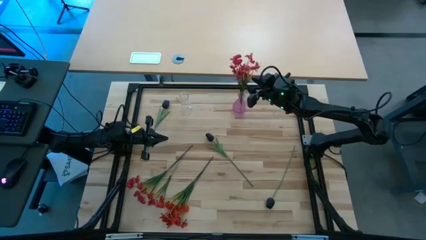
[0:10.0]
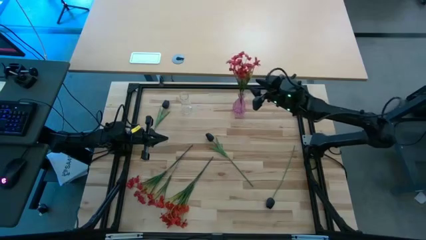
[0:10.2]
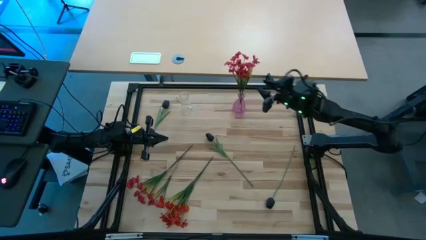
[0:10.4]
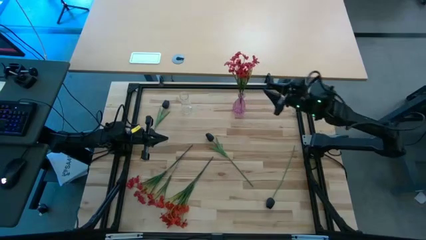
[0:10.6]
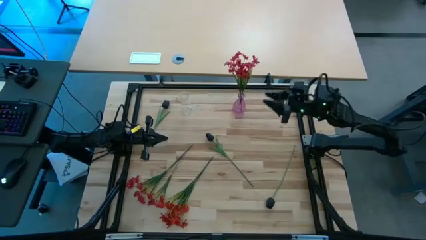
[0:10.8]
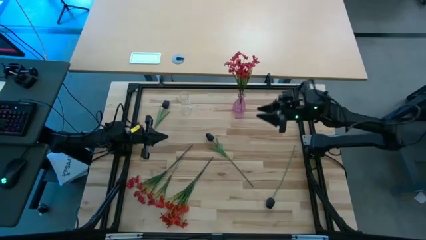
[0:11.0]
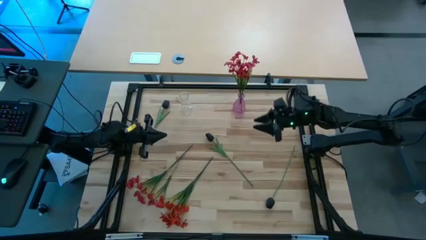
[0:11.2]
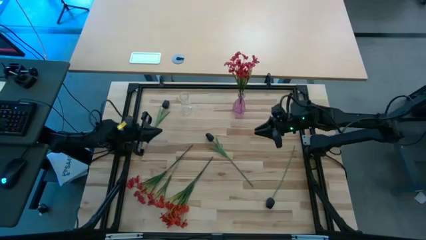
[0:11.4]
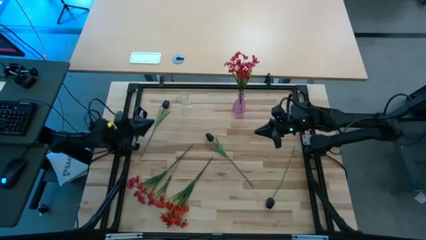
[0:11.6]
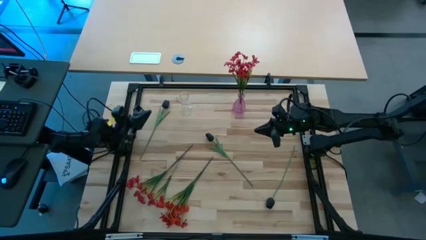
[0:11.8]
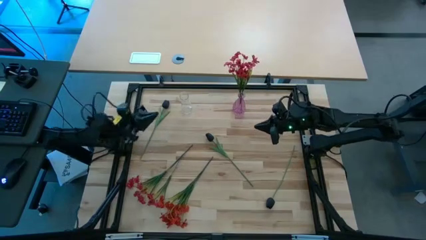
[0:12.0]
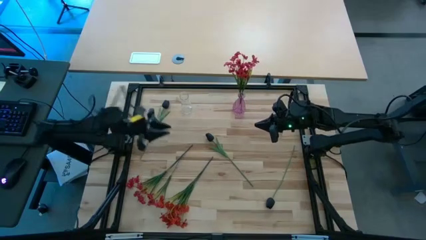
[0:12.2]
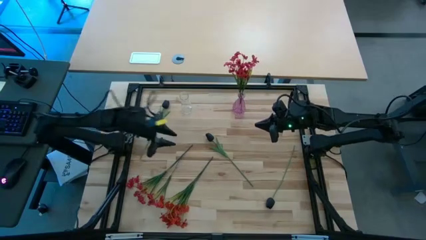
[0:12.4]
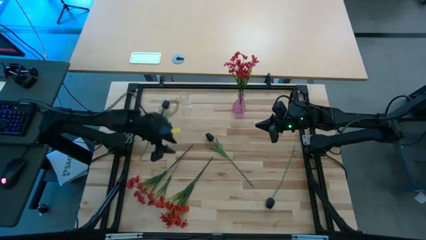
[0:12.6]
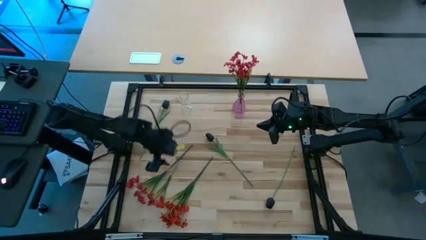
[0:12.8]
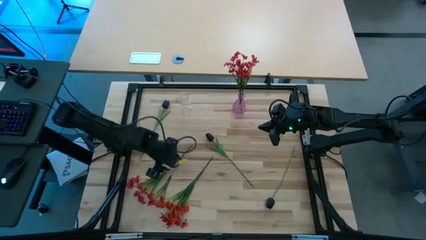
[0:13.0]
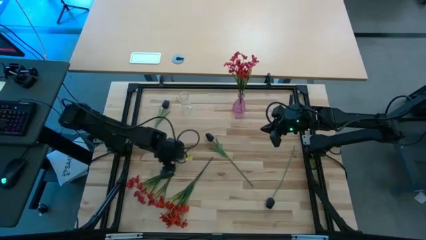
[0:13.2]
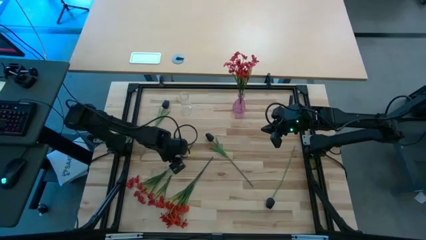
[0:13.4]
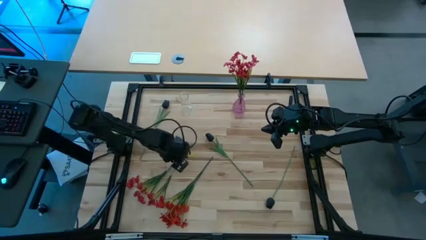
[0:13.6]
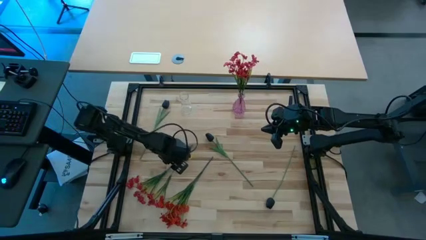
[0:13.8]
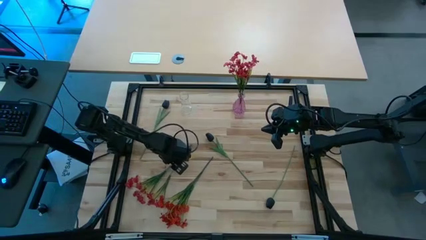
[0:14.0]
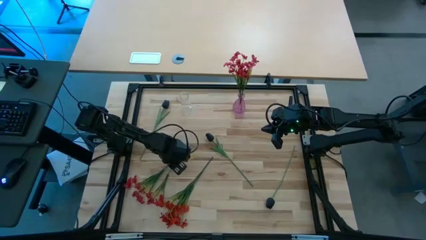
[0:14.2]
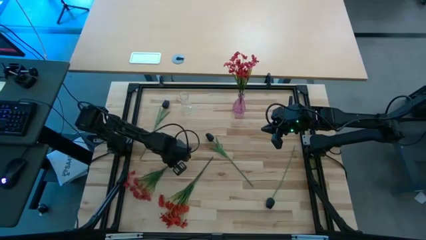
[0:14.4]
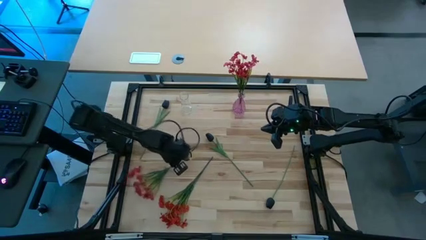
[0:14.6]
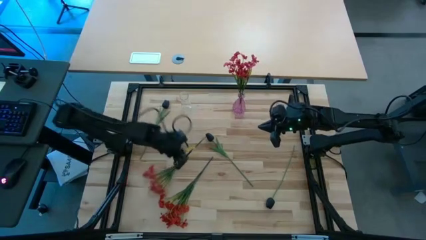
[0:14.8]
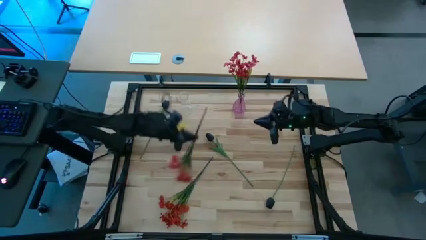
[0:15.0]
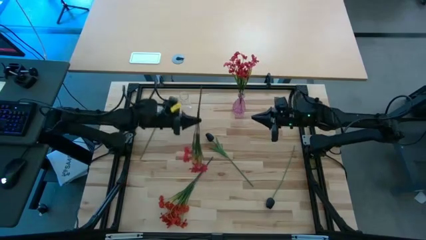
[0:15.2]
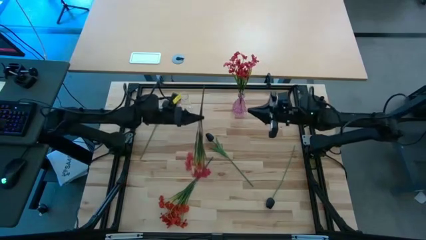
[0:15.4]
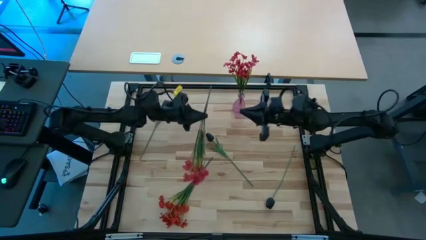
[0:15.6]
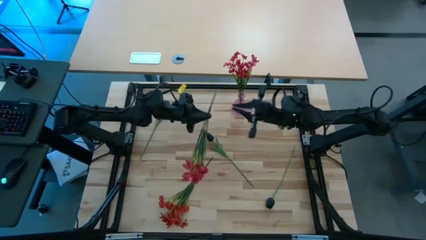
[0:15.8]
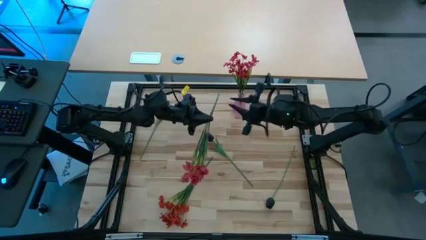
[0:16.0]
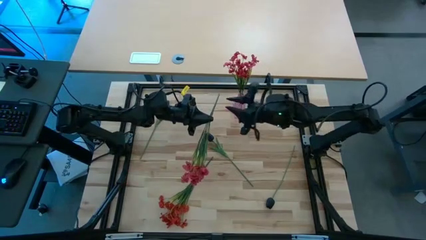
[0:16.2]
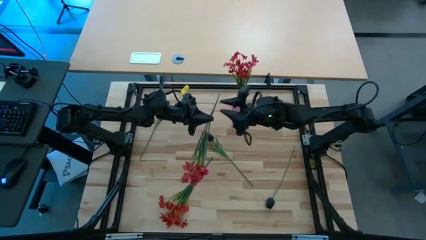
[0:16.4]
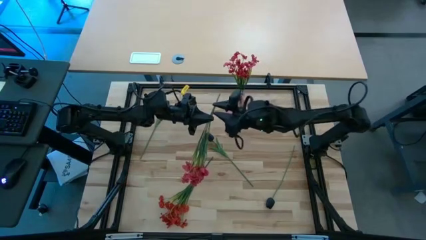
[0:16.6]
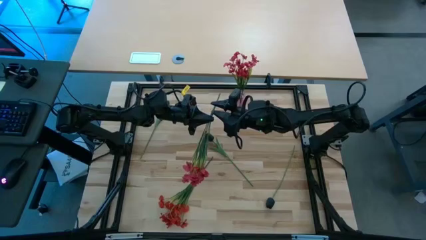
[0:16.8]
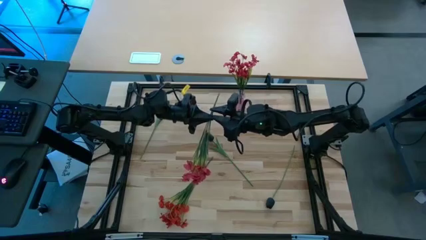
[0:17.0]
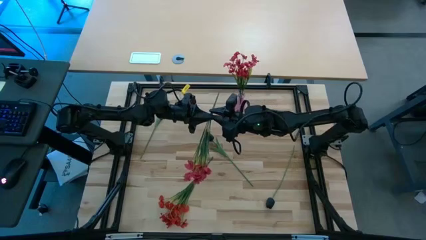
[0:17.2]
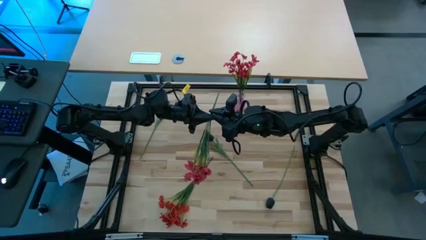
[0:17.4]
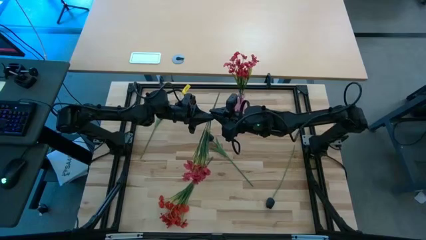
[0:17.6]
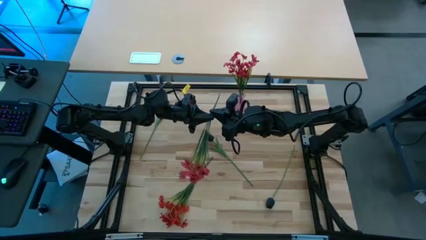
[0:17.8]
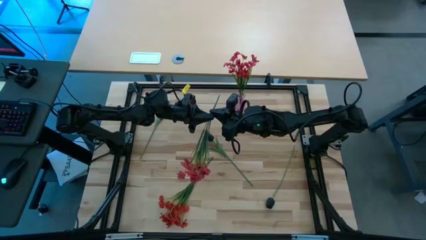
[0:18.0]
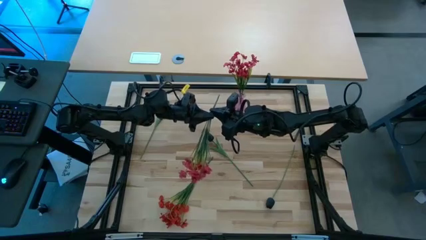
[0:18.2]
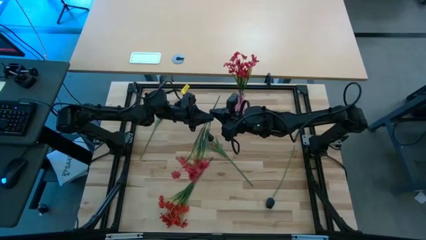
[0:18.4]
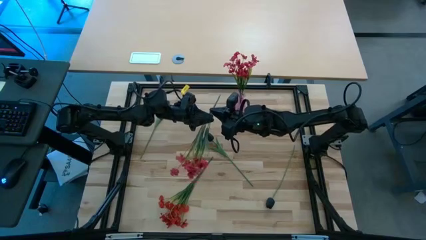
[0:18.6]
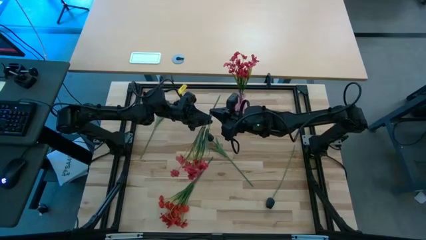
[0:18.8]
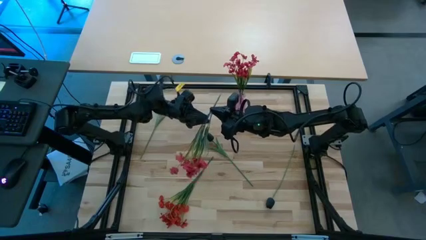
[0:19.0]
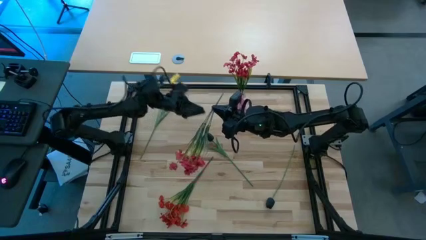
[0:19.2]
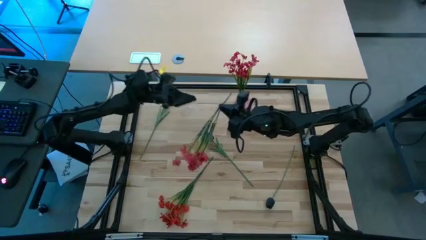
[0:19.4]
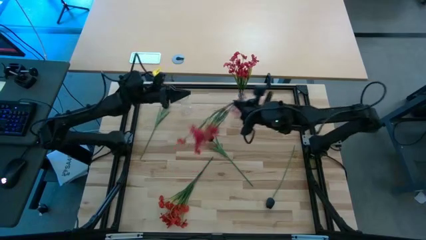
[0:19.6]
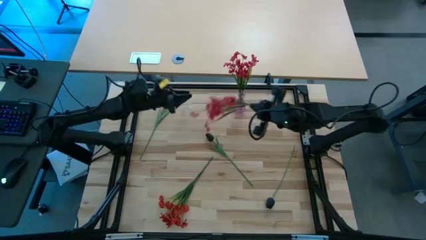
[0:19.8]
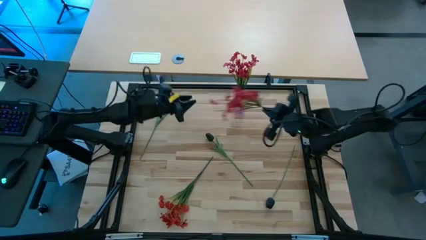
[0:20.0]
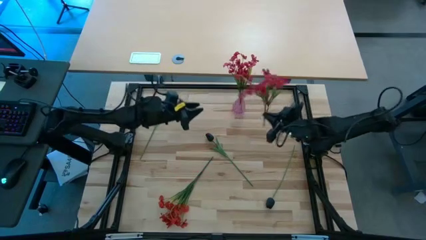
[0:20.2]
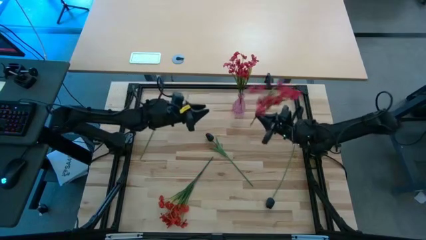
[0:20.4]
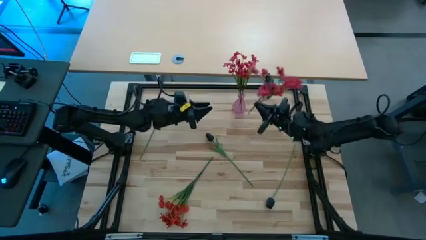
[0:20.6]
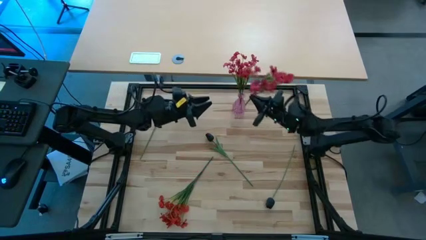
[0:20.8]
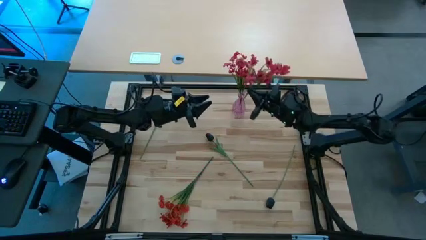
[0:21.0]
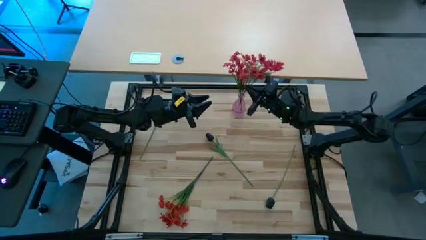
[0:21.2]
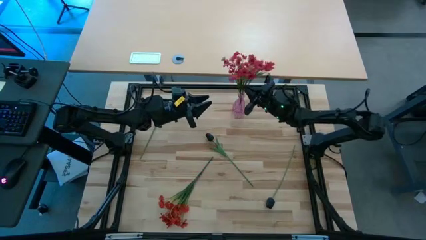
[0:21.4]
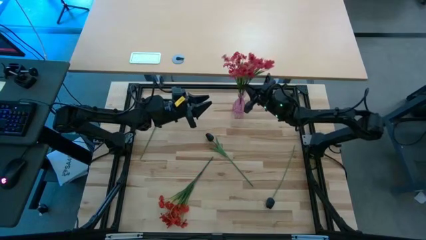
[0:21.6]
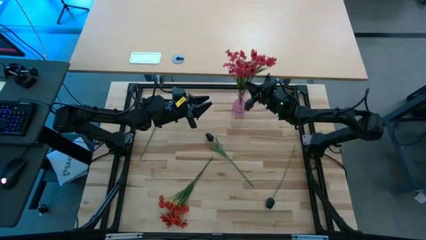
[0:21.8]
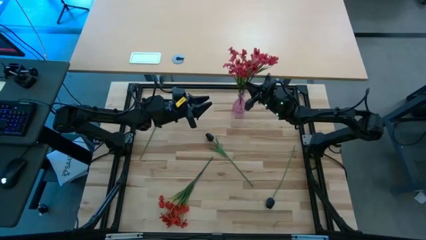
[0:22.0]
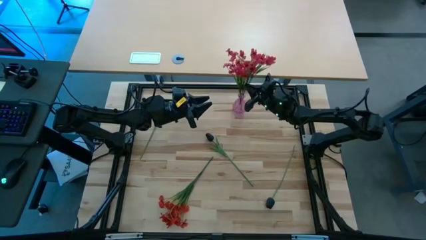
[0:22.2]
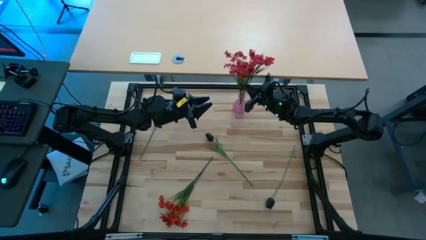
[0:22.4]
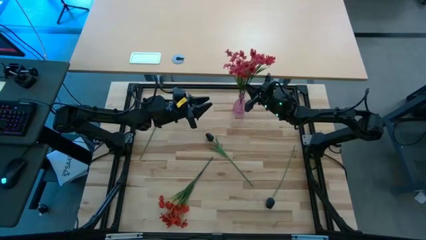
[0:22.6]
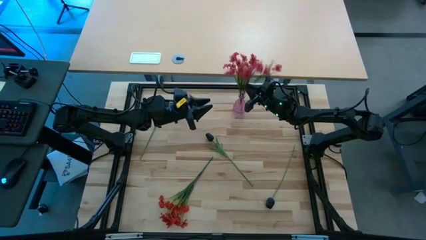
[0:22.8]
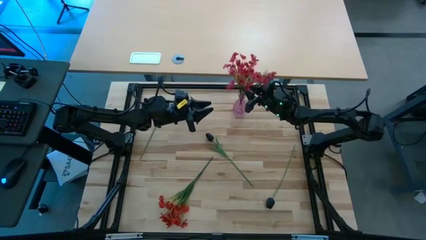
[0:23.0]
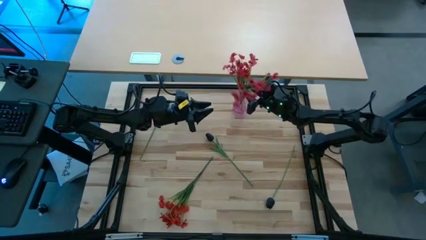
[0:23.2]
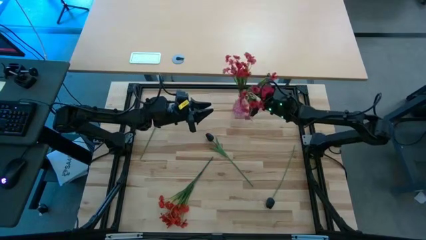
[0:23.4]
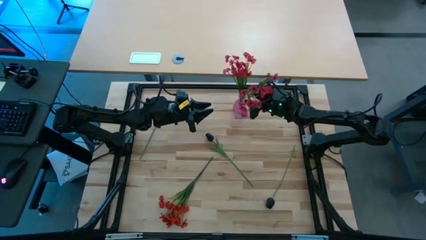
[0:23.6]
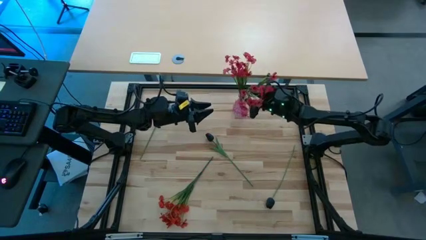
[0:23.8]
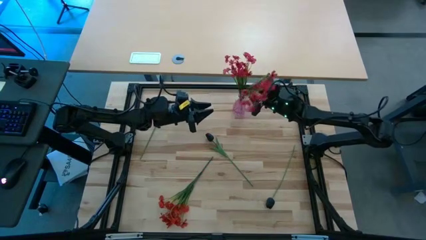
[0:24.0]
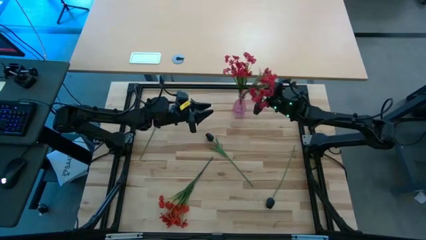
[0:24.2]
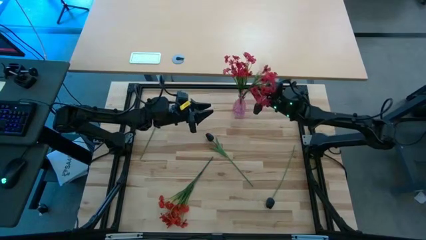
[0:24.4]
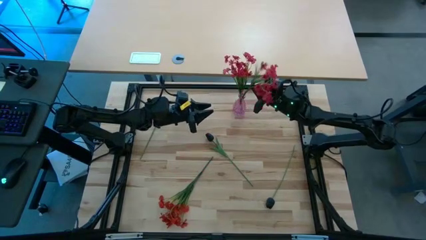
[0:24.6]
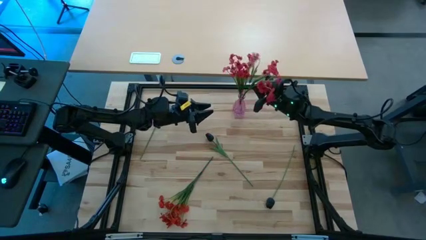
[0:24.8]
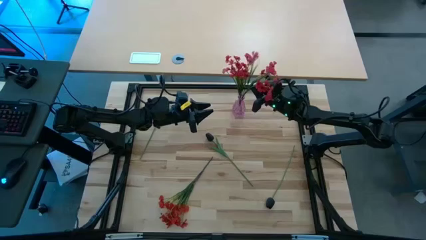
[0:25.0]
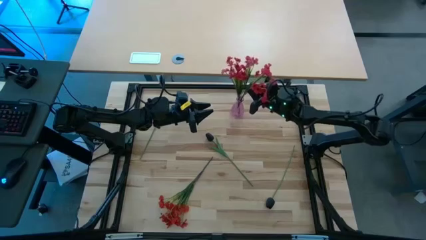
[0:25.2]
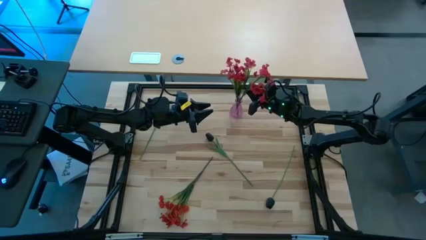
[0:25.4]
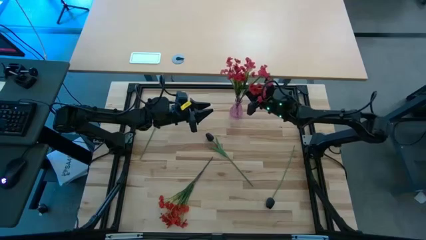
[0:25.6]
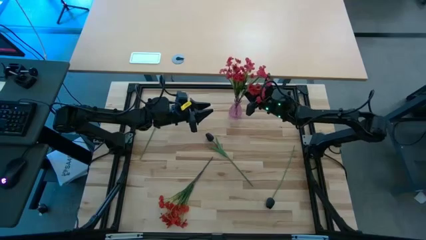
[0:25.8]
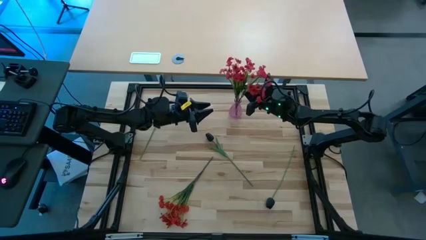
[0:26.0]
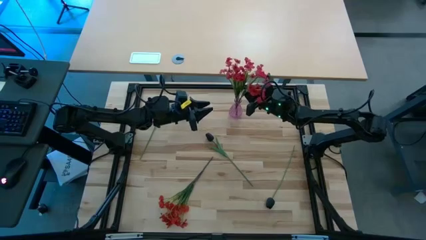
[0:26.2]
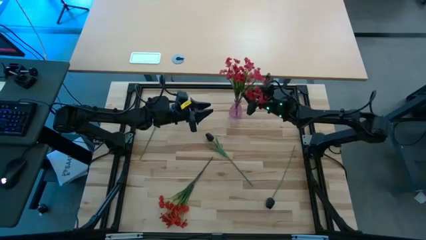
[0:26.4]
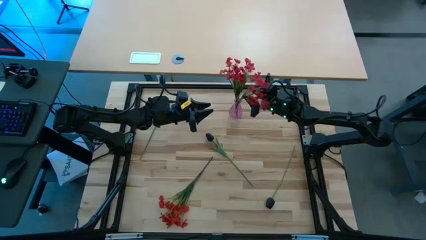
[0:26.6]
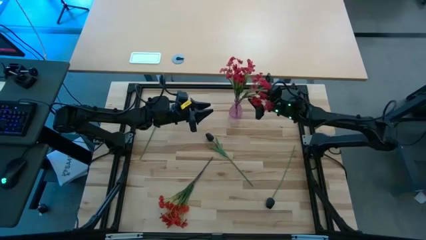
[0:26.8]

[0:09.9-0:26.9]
Task: Sort flowers into vase by color
Put the left red flowers into the purple vase
